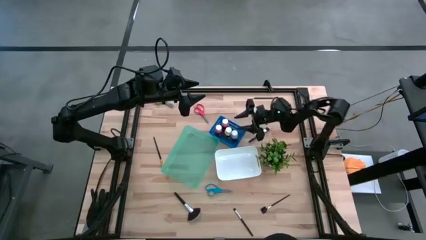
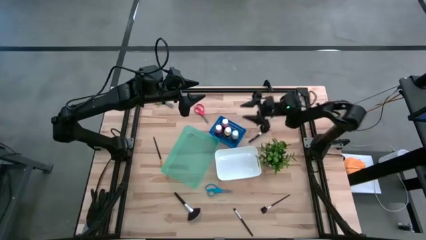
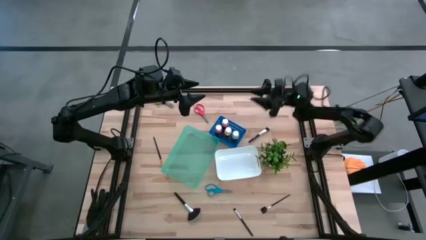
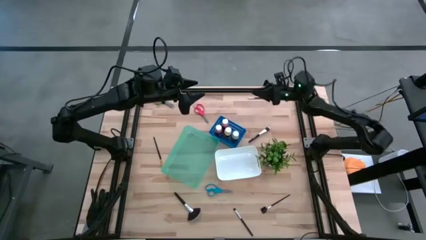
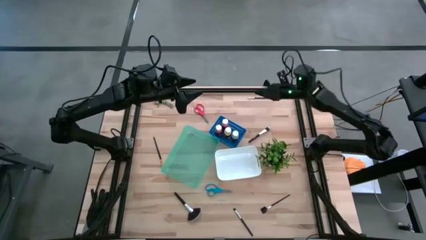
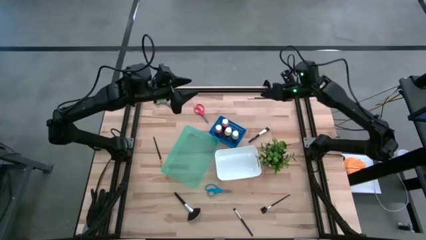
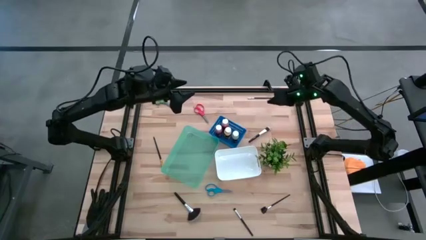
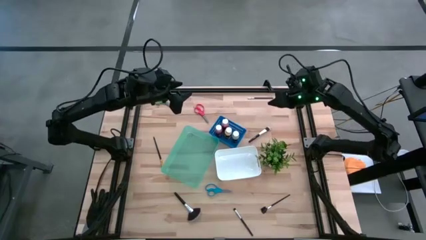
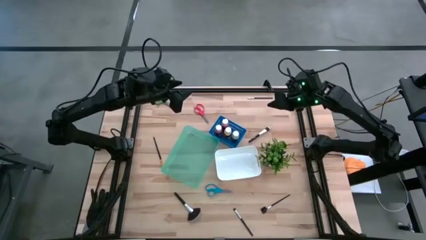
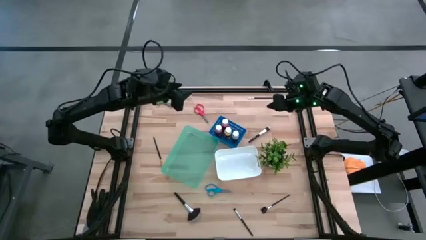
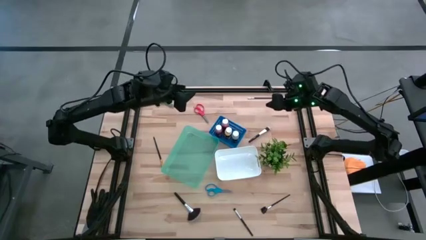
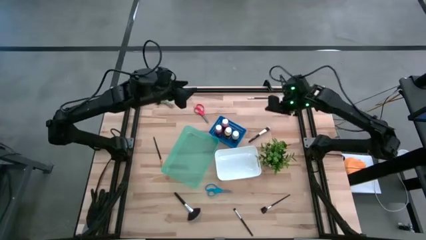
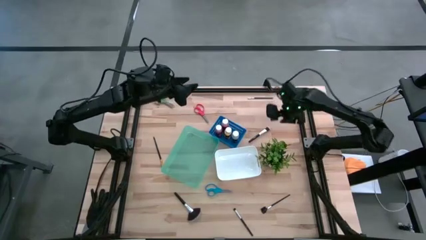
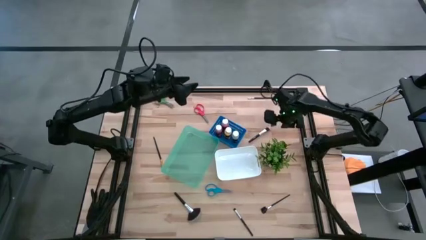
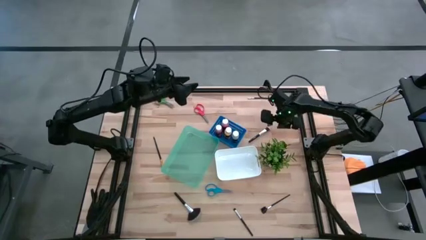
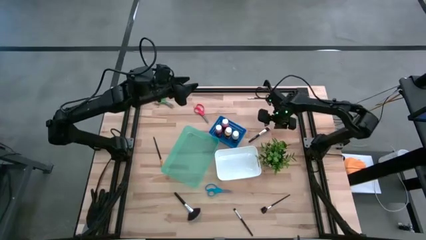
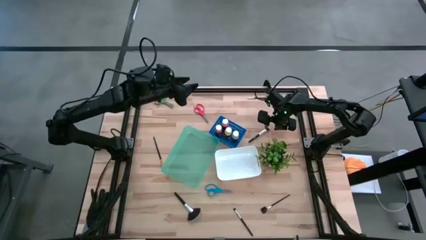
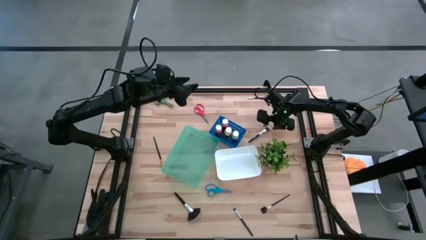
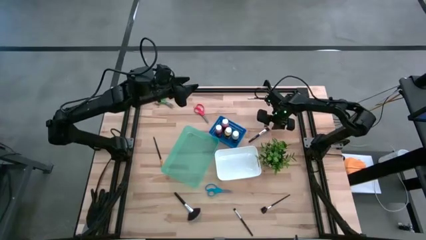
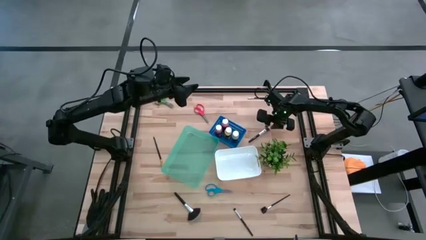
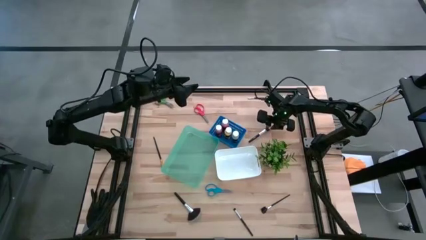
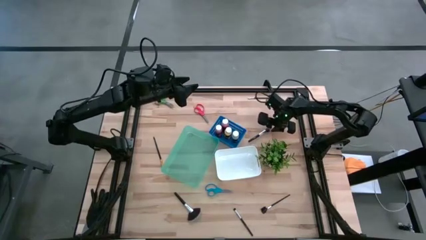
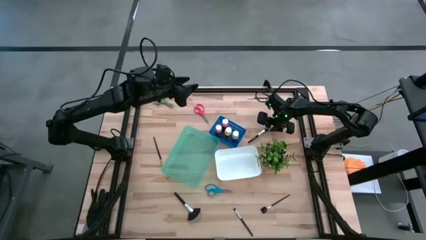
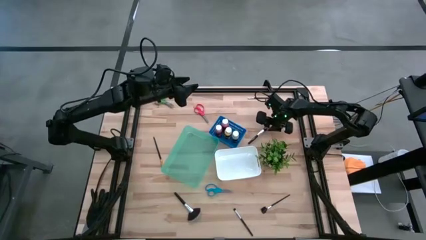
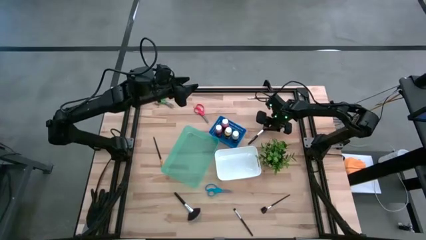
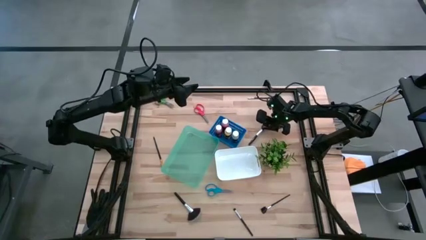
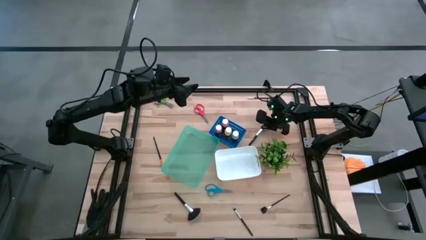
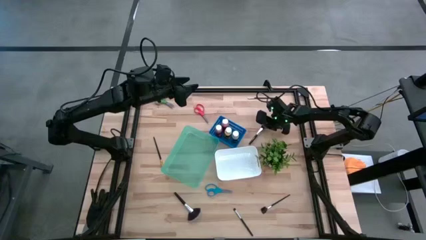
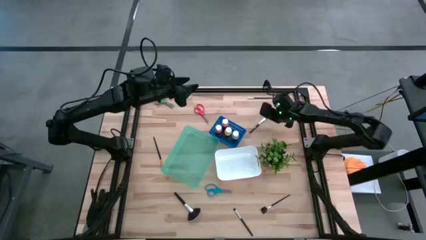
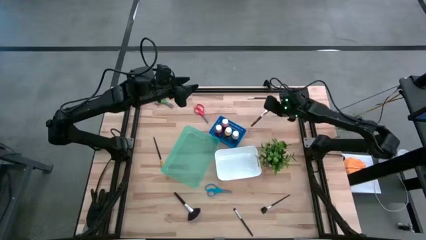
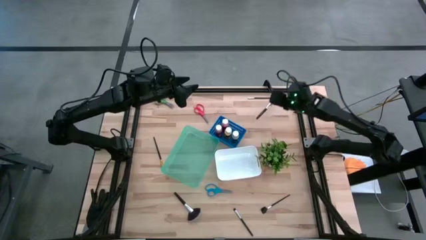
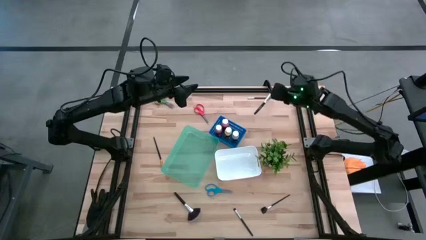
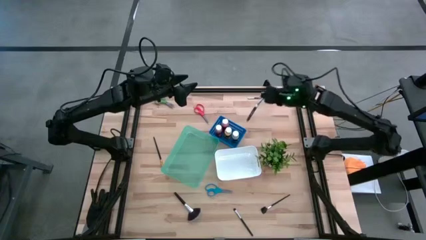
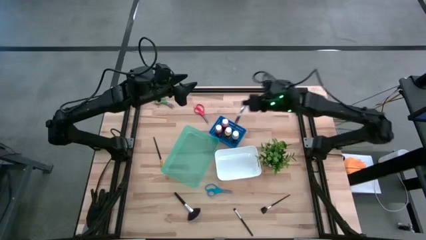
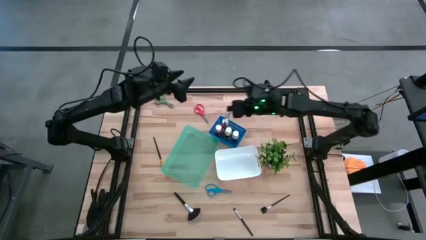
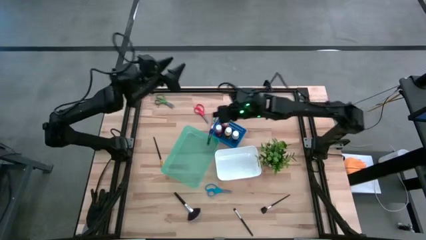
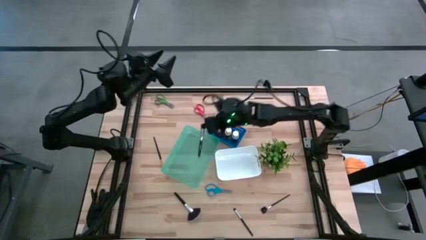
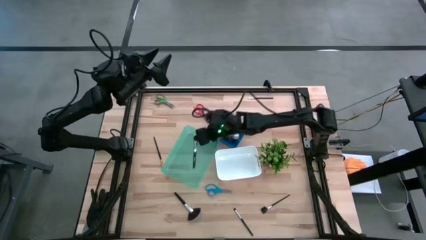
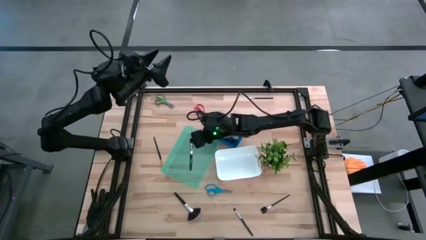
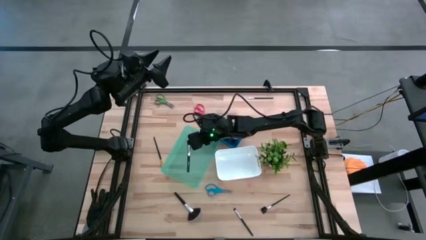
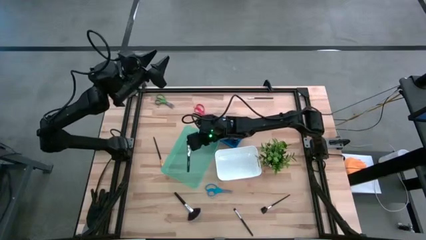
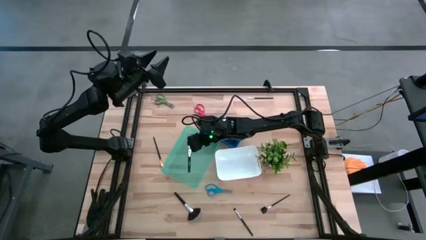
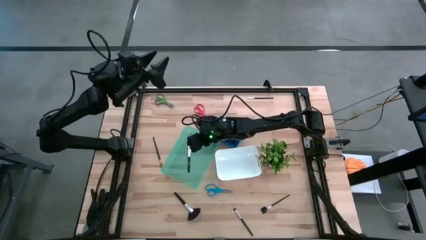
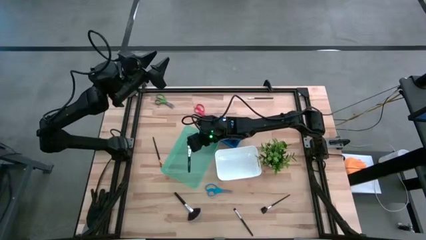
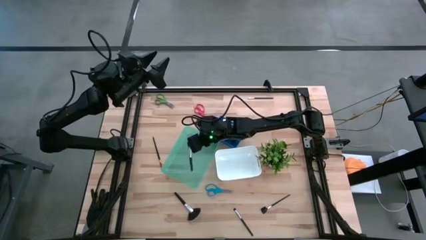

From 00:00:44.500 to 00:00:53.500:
Task: Pick & Place Paint Supplies
Put the black foundation brush into the green bin

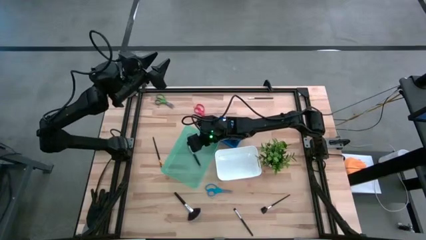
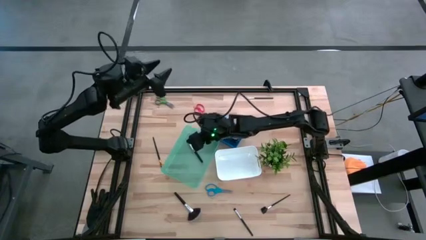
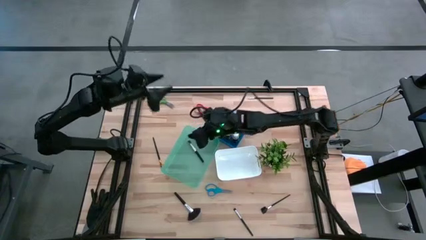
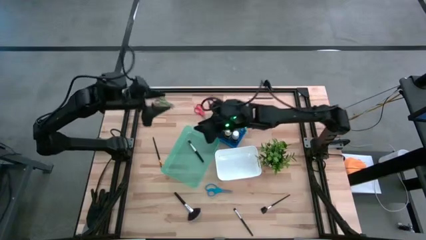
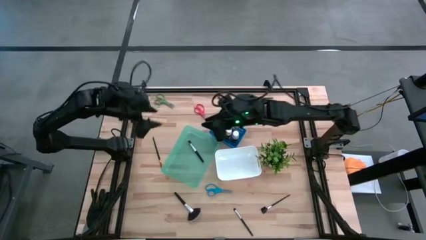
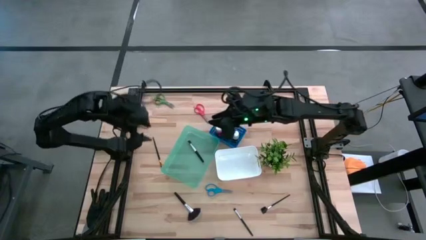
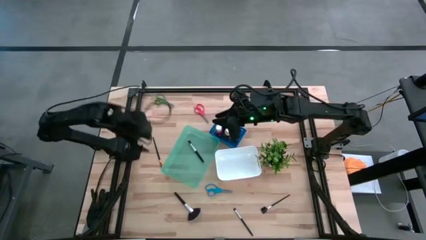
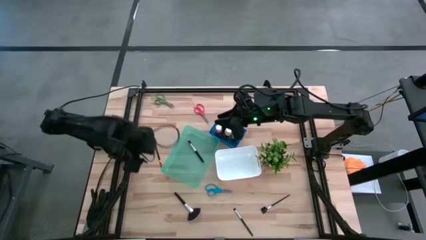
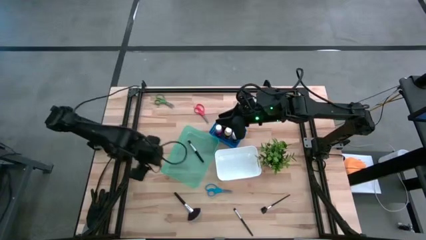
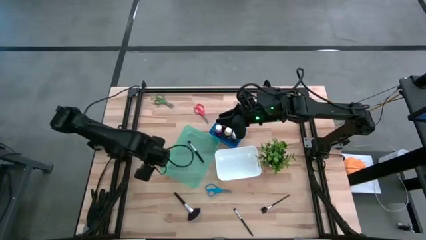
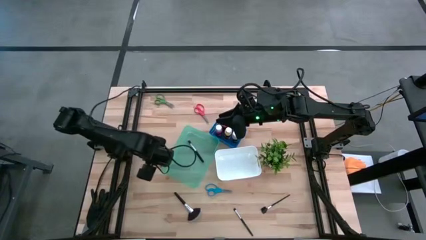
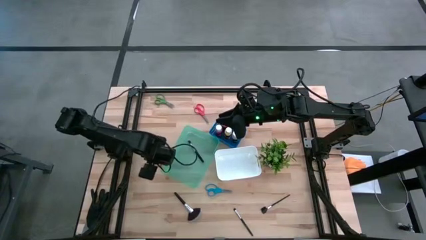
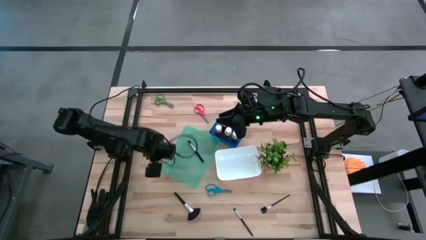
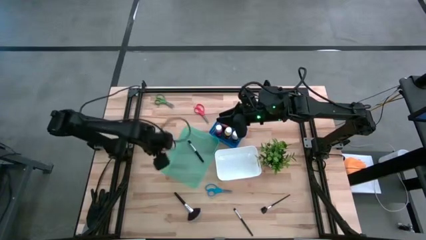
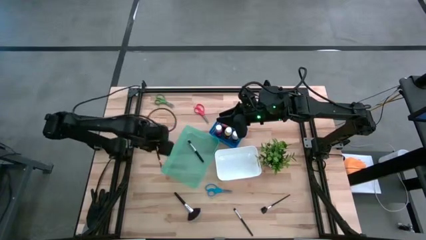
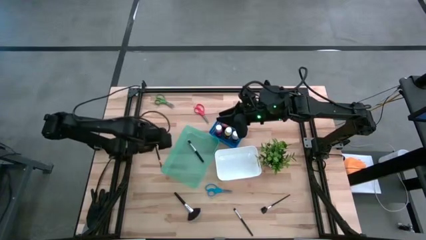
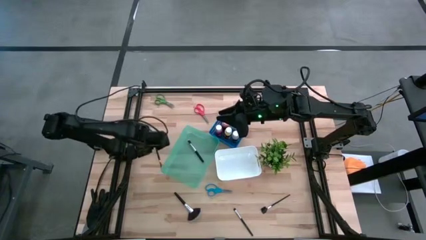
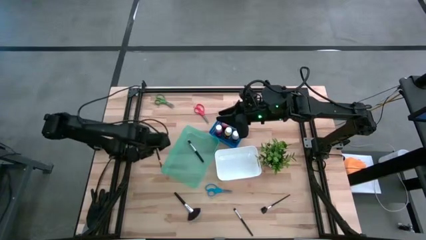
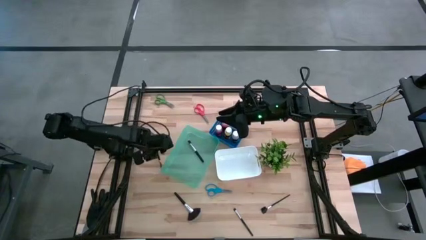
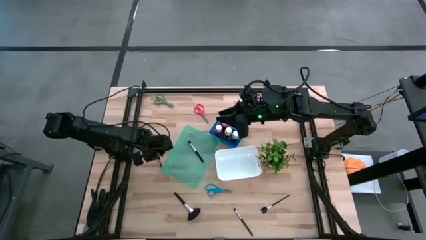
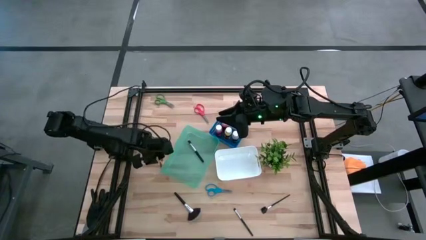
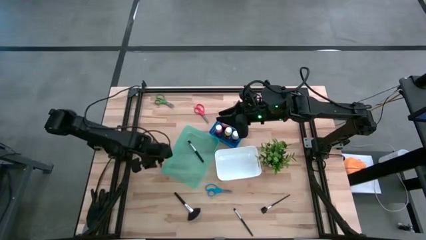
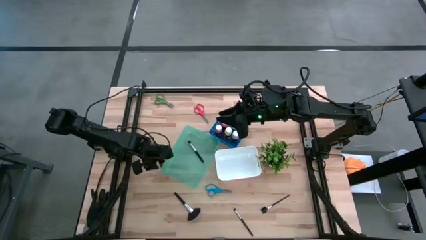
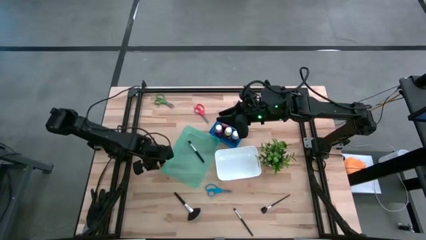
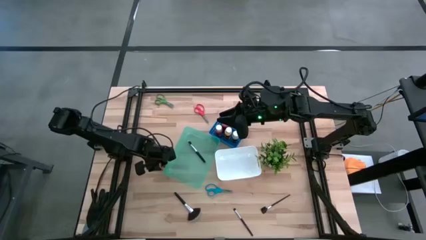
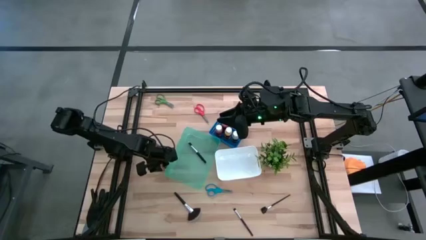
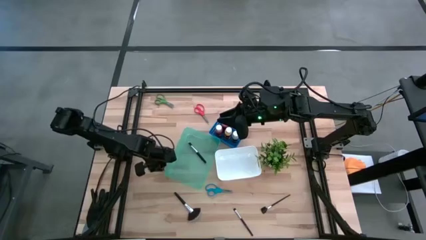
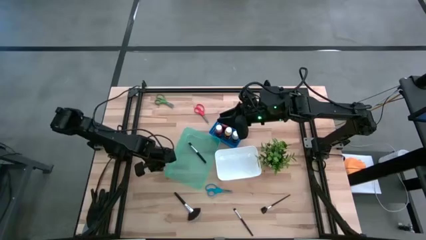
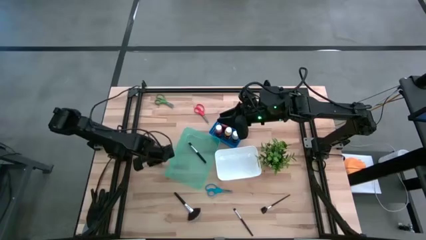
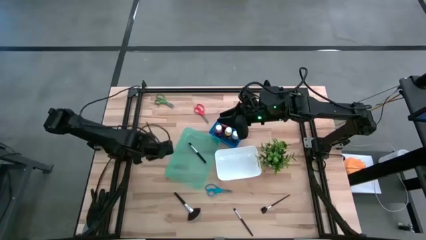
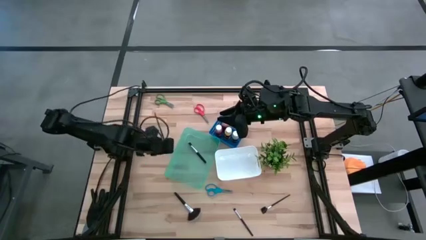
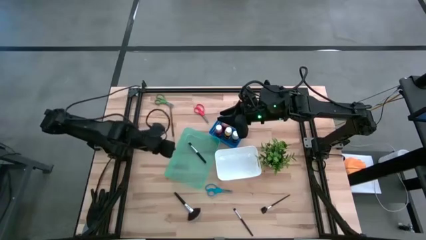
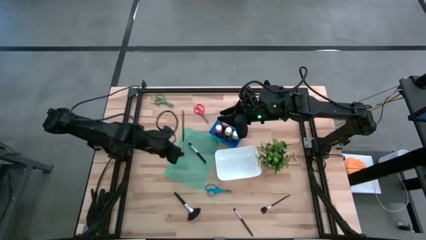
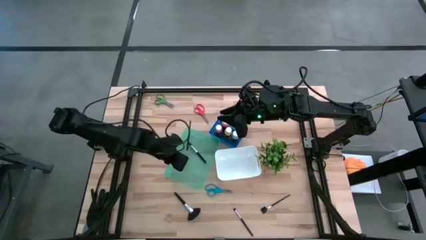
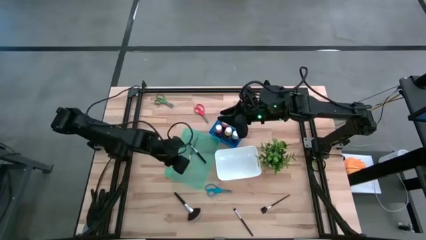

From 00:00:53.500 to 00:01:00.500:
Put the gold liner brush into the green bin
